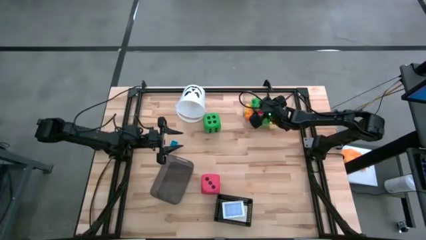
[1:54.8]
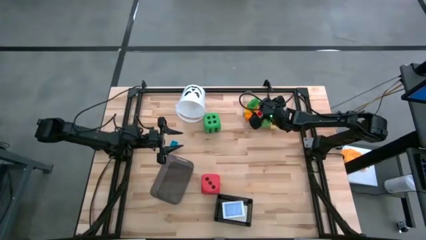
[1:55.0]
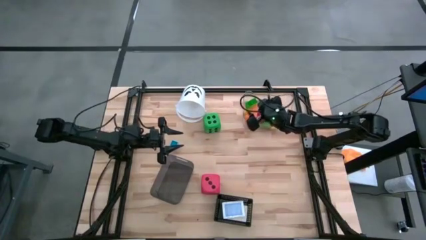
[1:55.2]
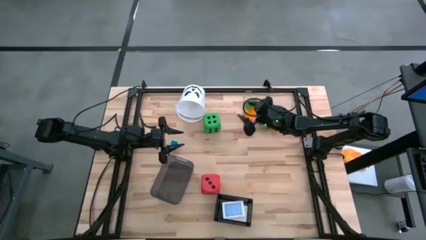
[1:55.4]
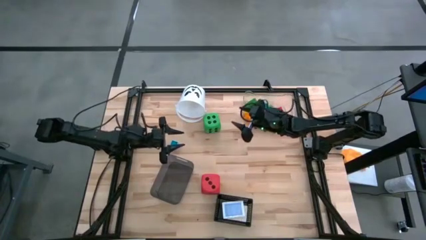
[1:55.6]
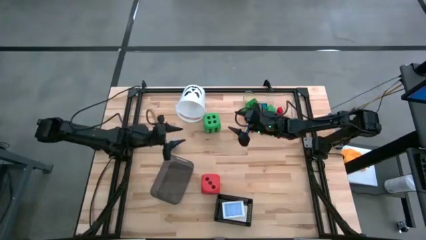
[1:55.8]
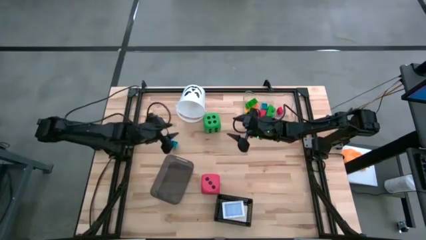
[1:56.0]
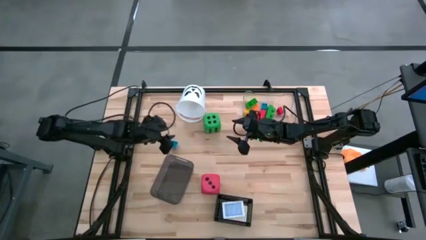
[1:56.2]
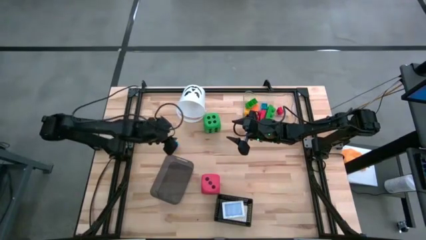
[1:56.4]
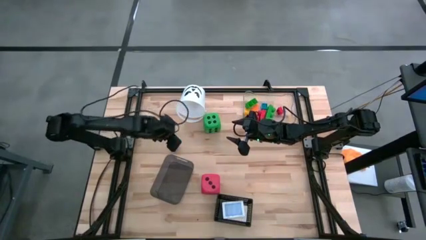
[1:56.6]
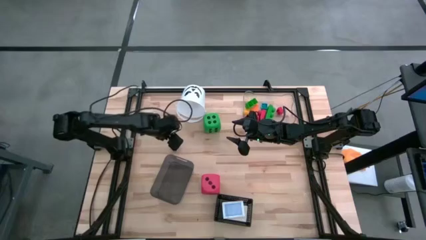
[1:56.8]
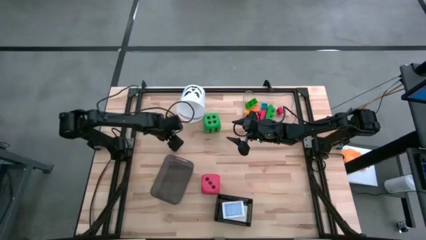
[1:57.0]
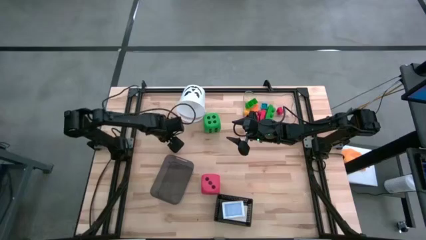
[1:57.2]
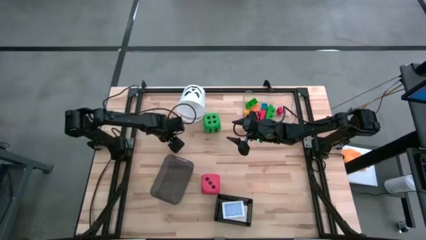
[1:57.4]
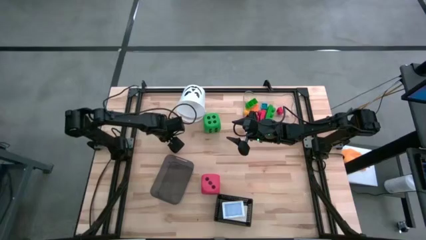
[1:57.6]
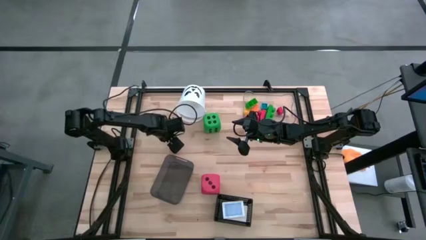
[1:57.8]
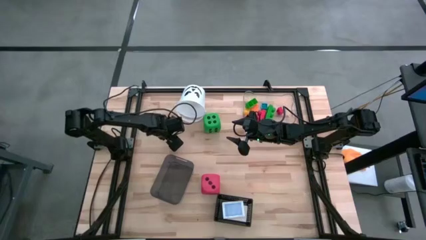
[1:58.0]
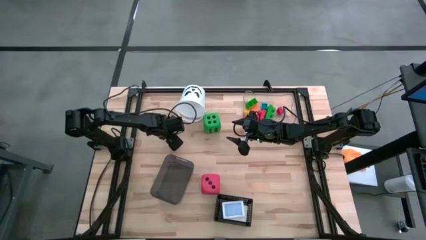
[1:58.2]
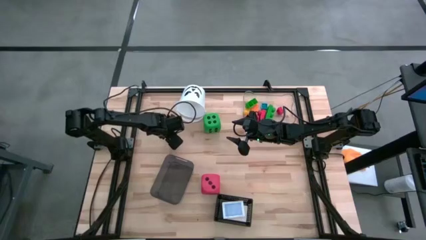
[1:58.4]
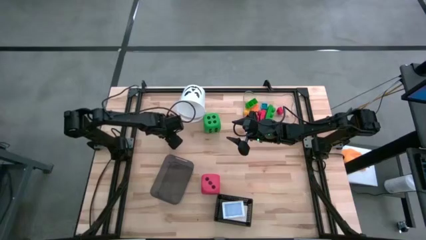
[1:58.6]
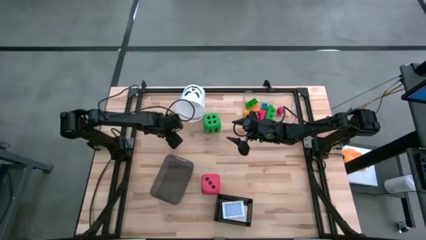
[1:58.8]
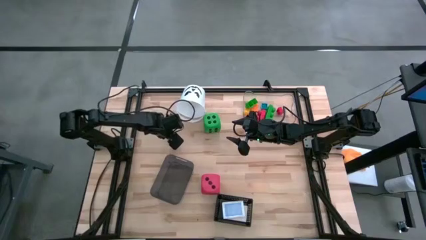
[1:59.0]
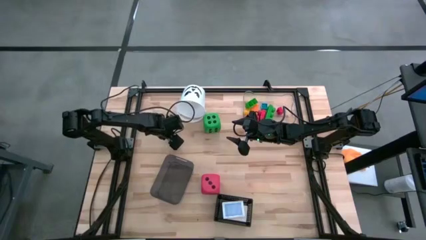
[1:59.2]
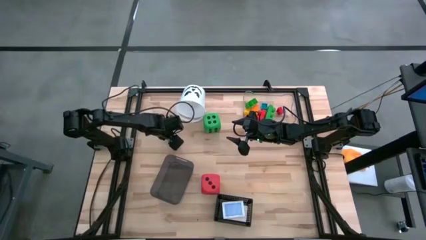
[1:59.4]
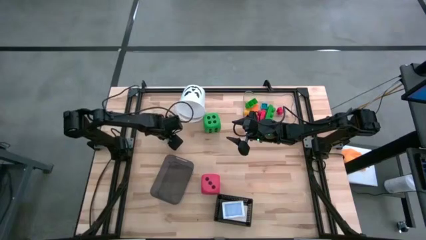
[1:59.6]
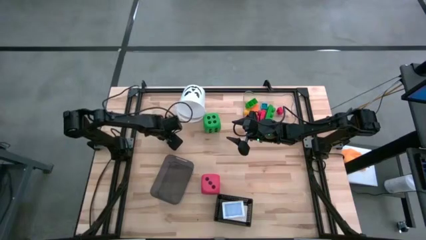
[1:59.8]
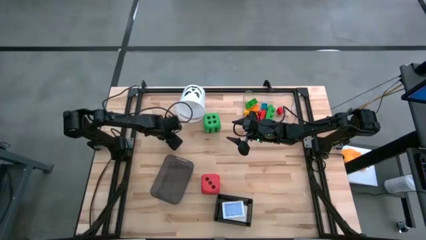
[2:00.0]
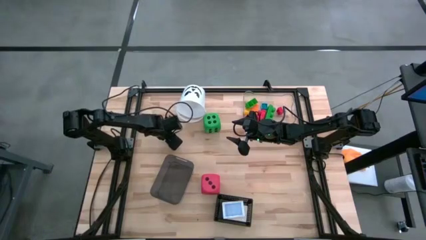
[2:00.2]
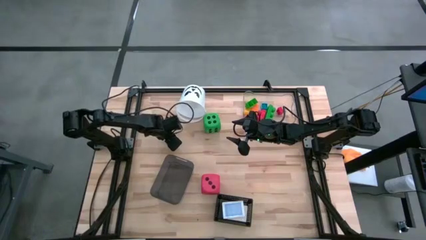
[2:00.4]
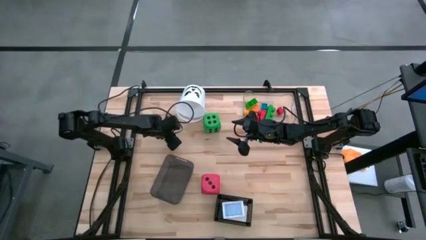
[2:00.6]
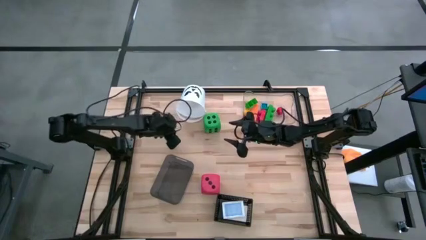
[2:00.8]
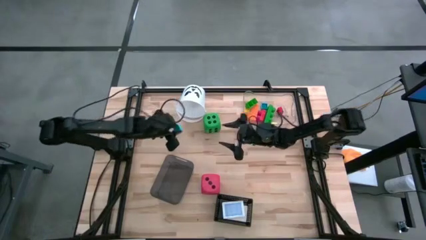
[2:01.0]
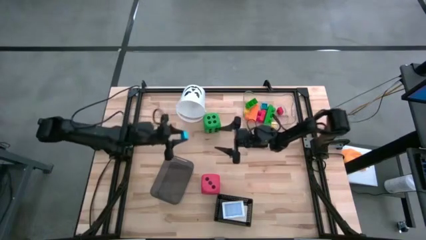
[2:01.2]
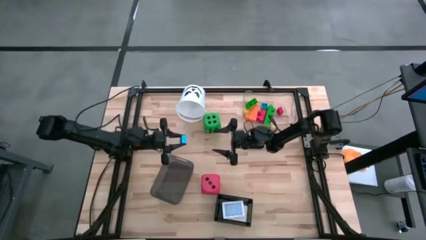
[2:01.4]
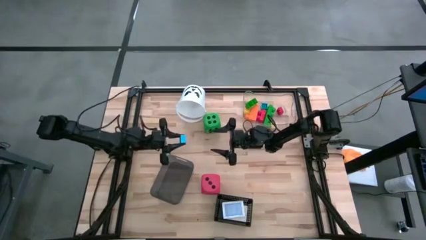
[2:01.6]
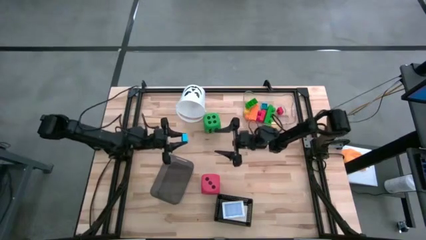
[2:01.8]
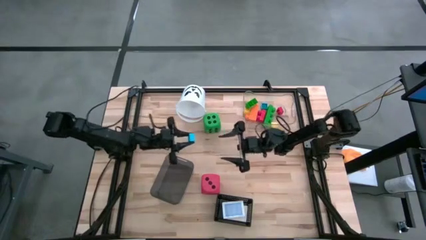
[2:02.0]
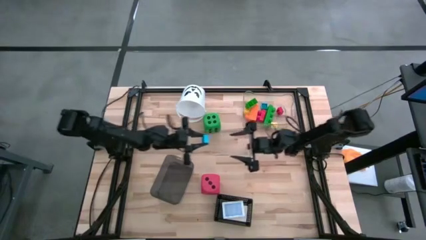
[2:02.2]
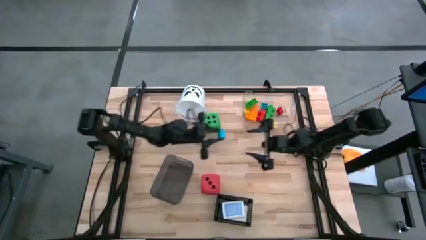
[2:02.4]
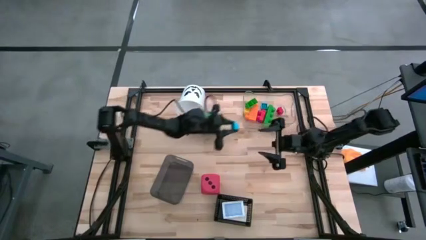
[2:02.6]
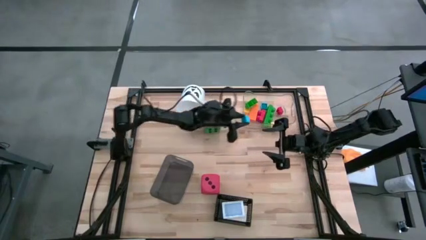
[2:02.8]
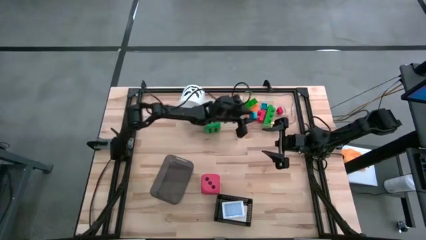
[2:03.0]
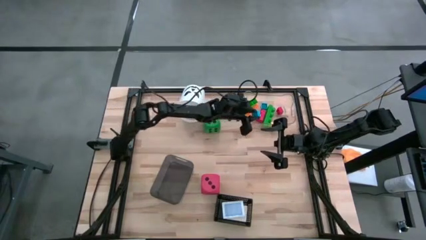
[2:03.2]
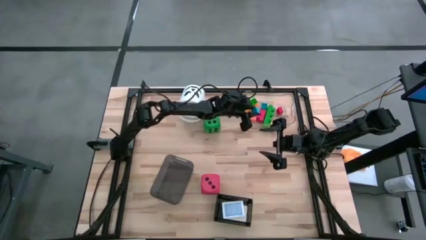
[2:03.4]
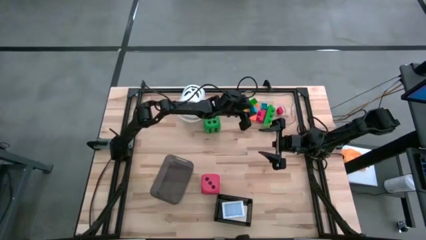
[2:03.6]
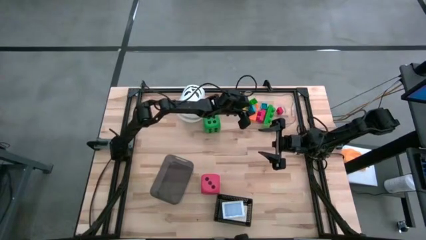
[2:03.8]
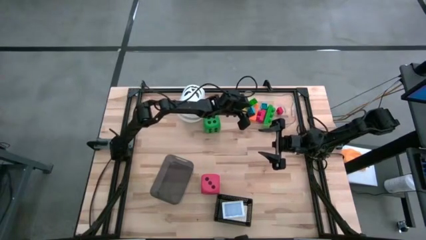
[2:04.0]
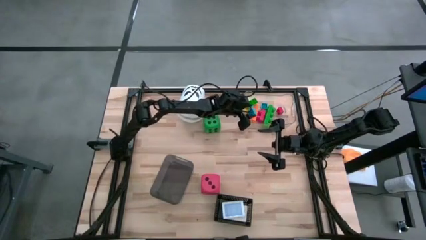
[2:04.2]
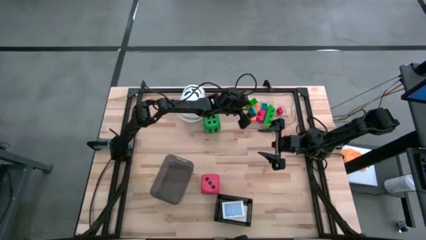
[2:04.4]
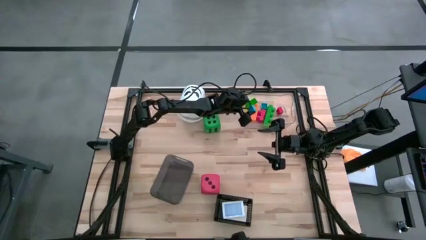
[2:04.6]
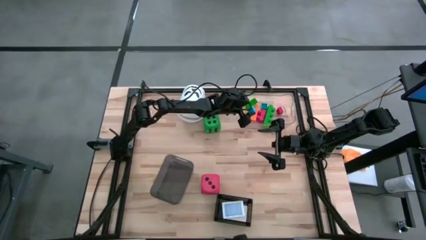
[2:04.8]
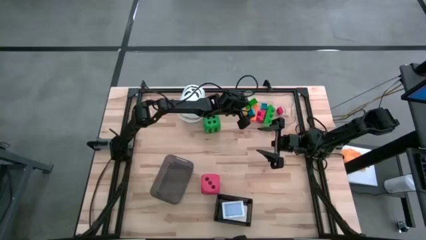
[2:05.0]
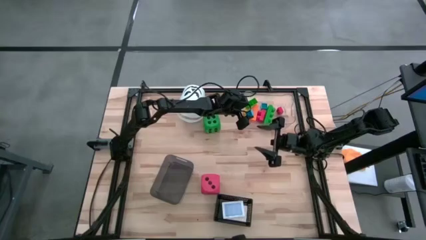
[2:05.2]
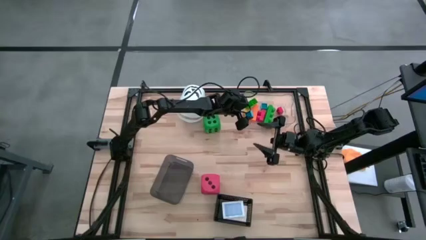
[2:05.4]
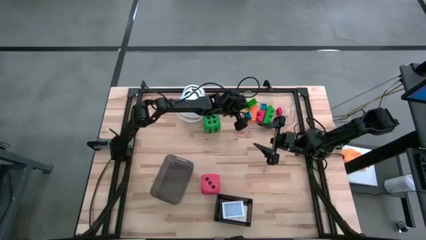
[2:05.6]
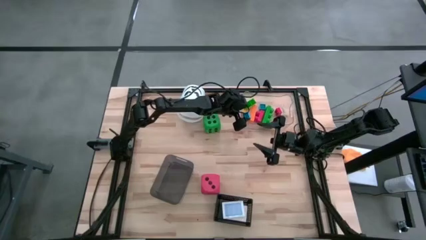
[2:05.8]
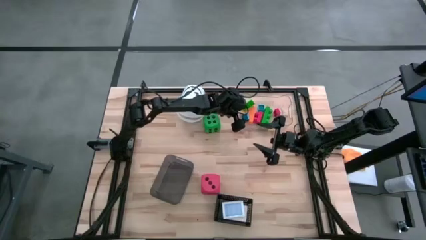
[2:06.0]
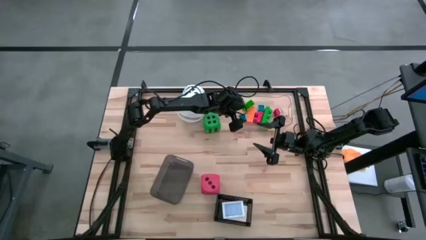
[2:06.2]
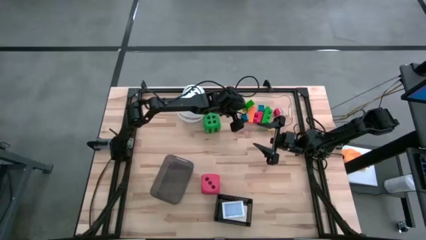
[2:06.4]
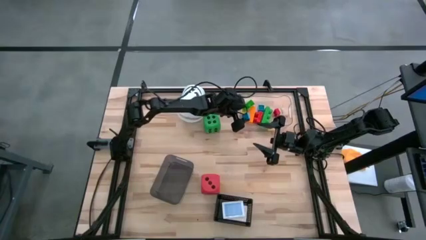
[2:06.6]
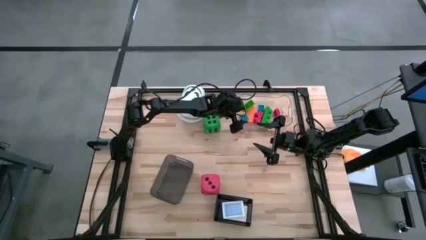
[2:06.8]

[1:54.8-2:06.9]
Task: Pick & Place Toys
Put the blue game piece into the transparent bin

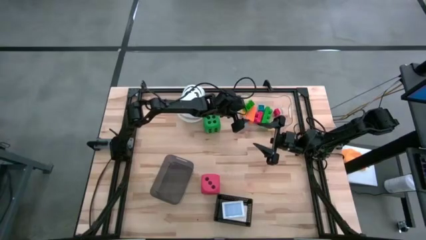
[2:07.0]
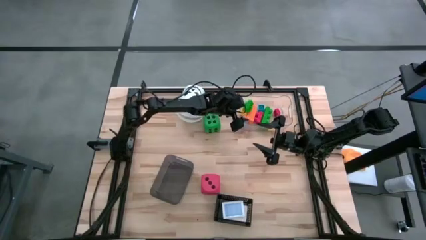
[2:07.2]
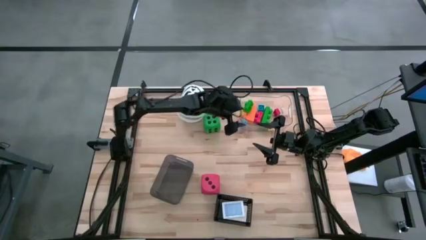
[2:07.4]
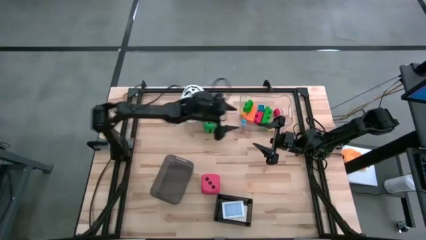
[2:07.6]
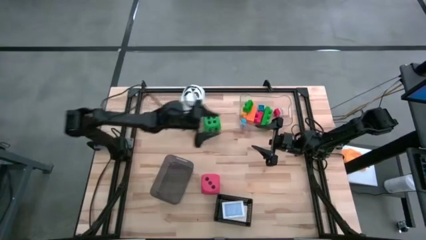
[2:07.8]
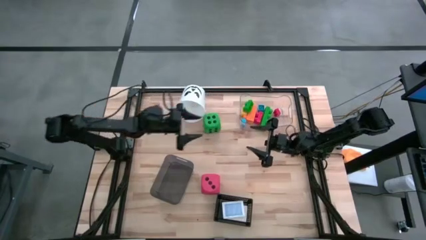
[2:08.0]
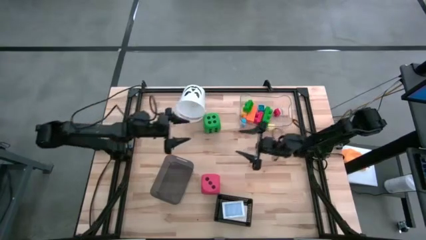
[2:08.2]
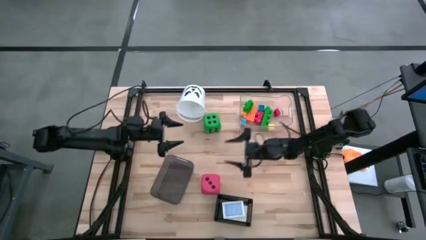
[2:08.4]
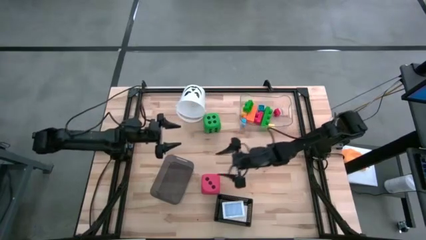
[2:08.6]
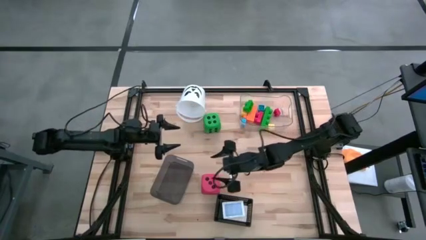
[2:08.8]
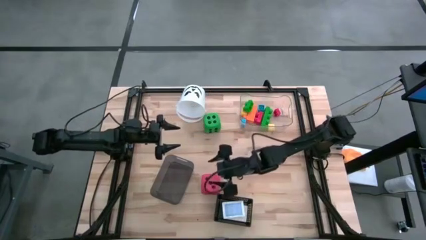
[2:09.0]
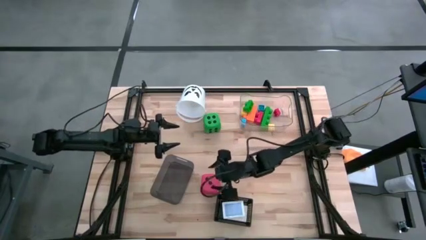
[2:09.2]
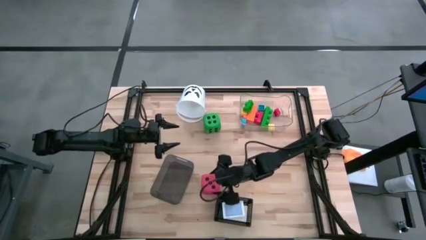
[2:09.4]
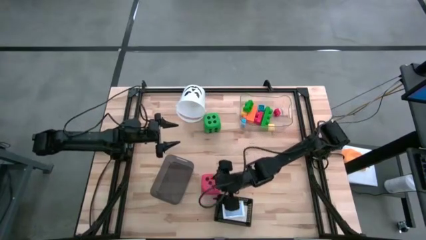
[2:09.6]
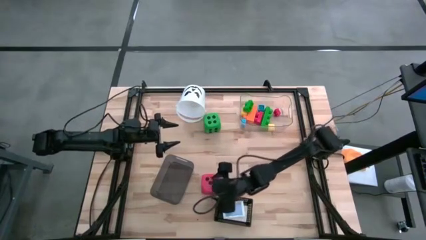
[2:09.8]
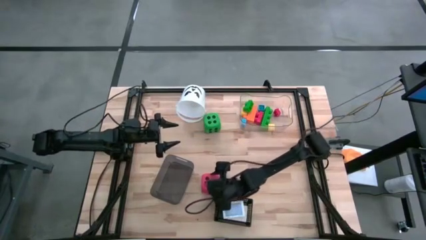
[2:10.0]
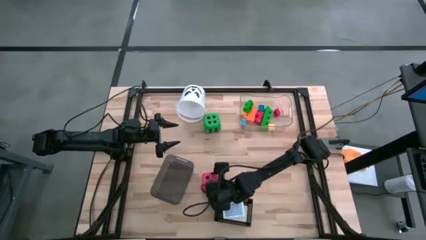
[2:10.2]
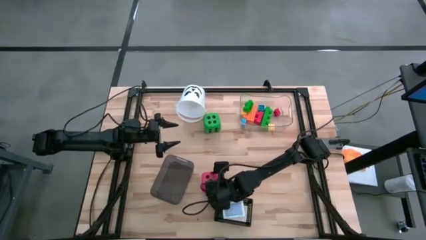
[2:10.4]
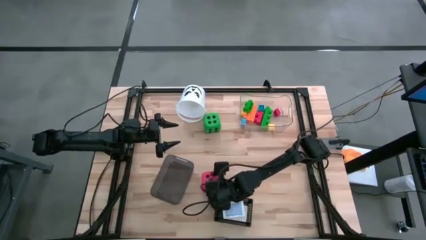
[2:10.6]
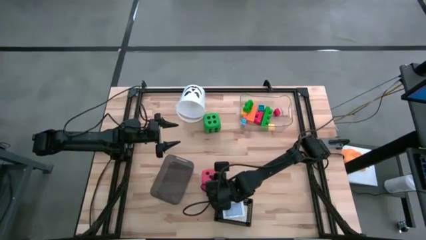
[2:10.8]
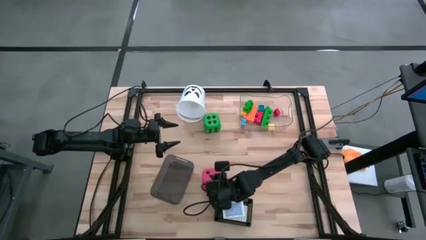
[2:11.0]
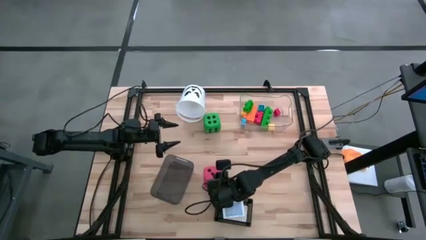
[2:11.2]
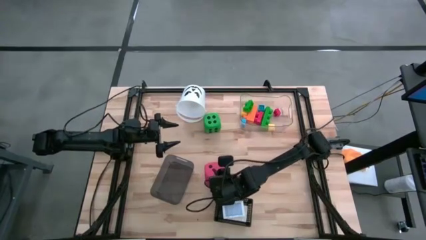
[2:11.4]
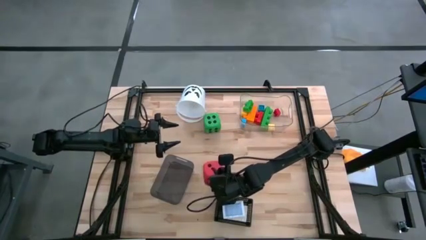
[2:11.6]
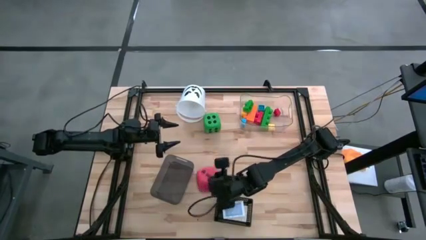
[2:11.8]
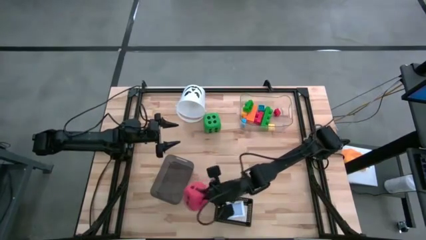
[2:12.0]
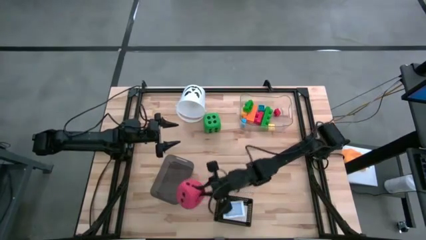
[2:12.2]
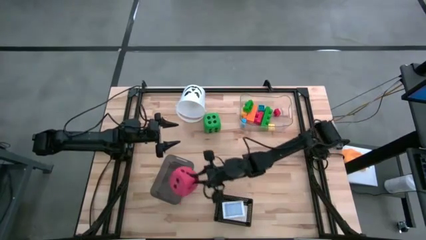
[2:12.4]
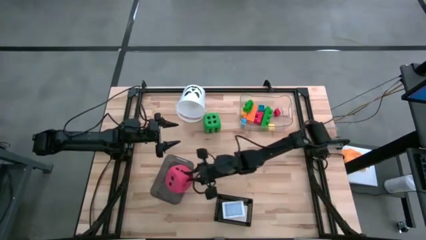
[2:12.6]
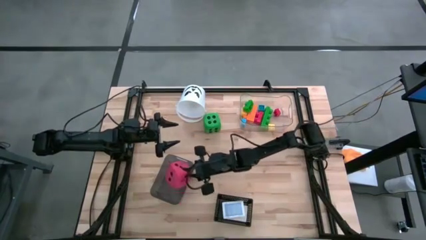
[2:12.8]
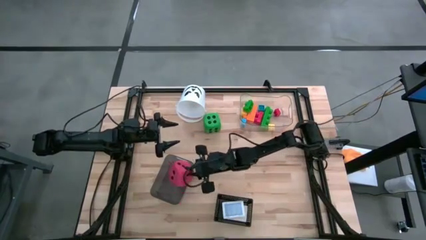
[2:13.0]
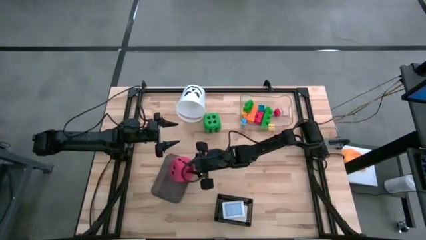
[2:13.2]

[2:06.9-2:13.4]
Put the red die into the gray bin
